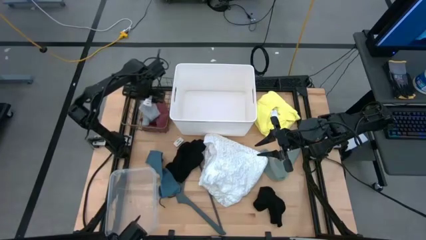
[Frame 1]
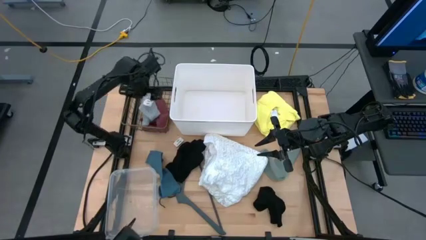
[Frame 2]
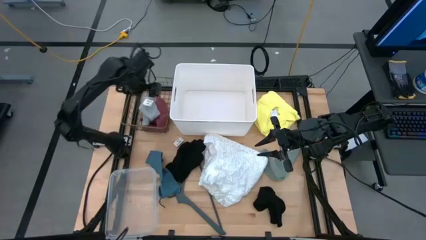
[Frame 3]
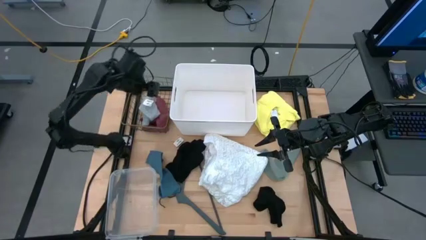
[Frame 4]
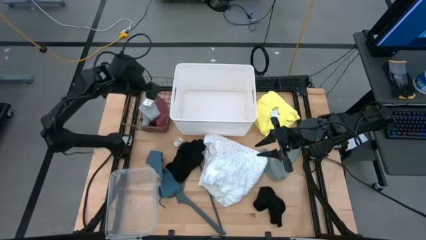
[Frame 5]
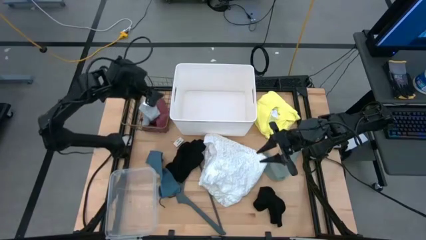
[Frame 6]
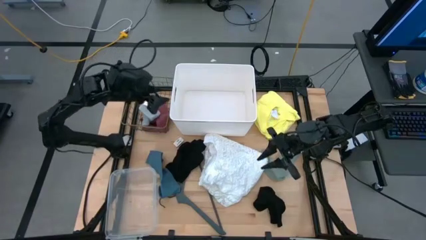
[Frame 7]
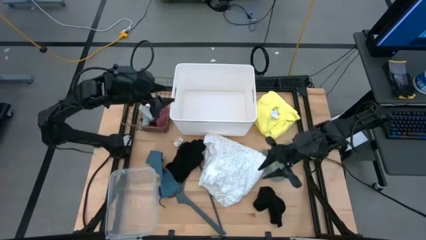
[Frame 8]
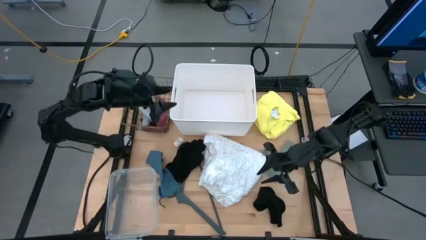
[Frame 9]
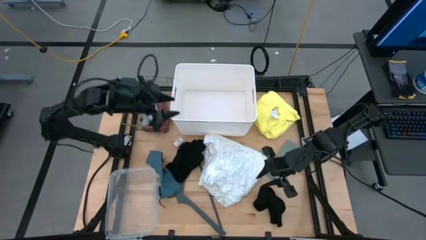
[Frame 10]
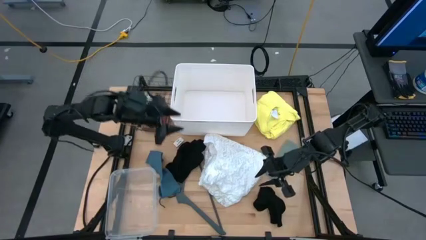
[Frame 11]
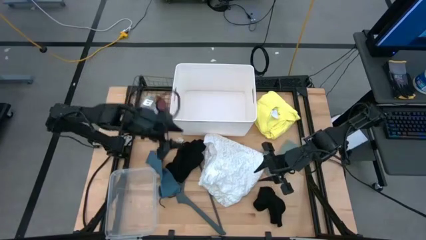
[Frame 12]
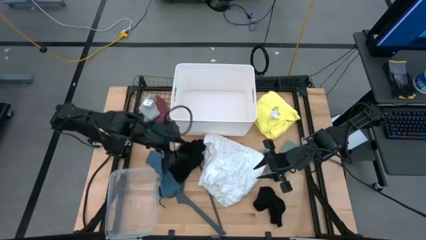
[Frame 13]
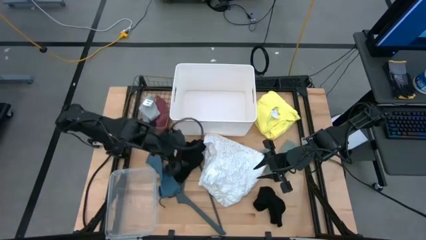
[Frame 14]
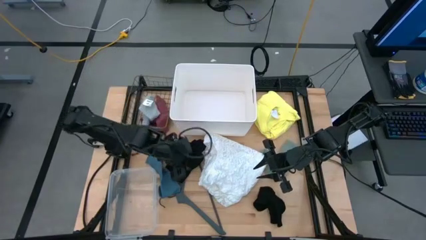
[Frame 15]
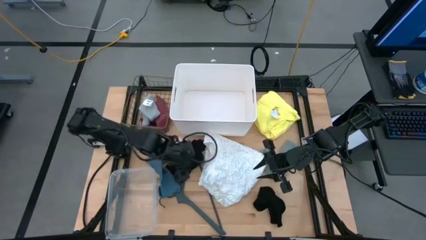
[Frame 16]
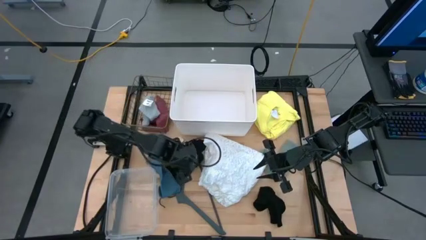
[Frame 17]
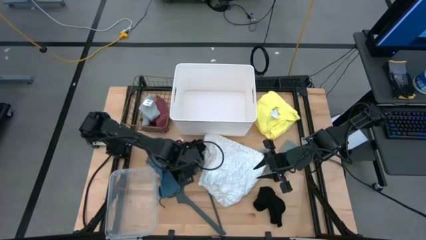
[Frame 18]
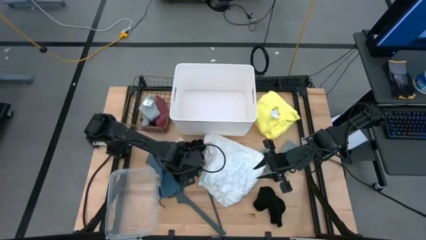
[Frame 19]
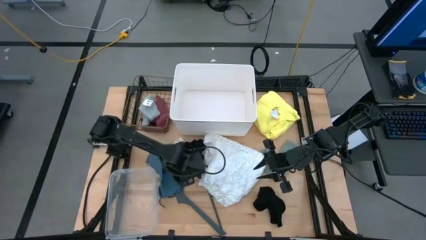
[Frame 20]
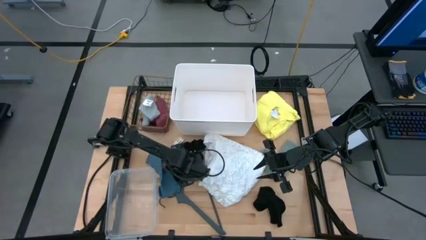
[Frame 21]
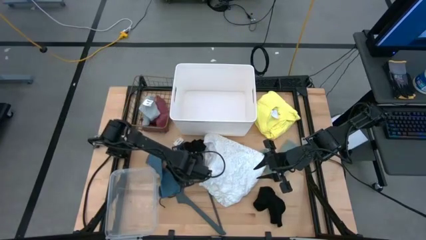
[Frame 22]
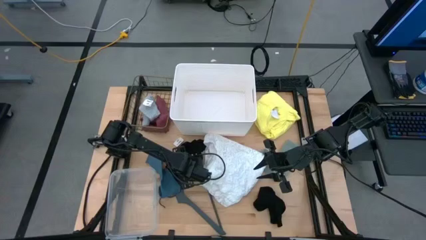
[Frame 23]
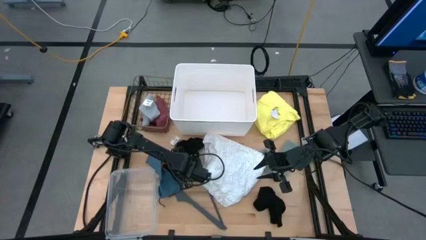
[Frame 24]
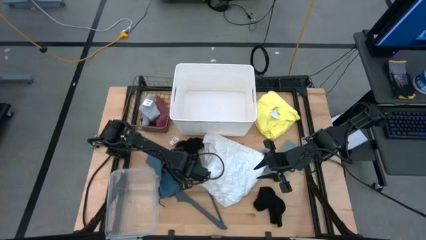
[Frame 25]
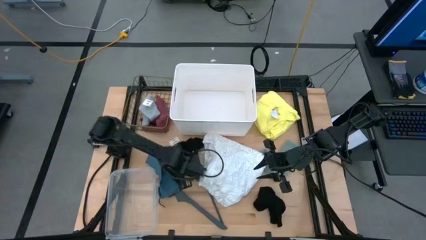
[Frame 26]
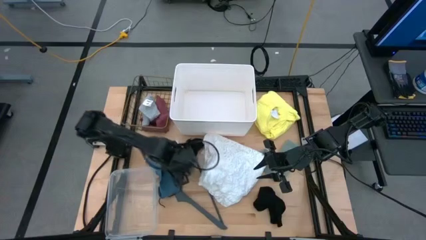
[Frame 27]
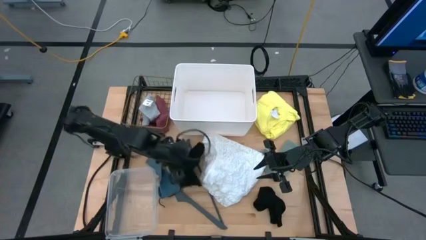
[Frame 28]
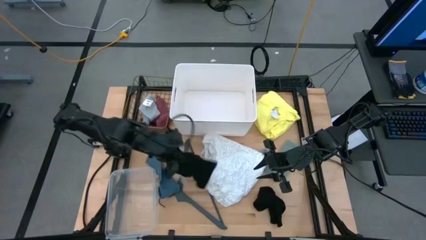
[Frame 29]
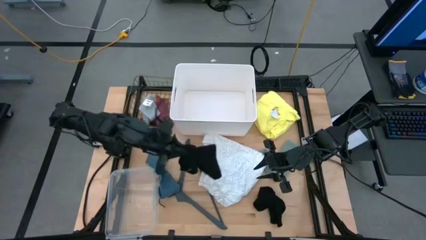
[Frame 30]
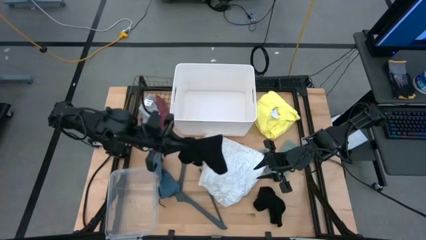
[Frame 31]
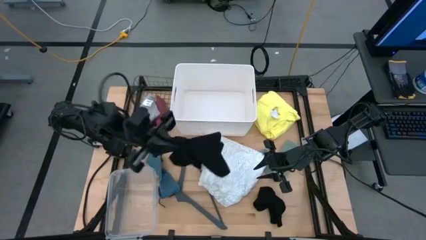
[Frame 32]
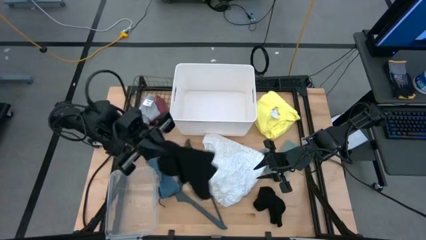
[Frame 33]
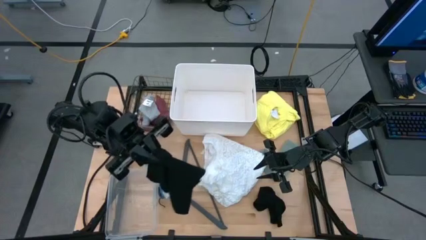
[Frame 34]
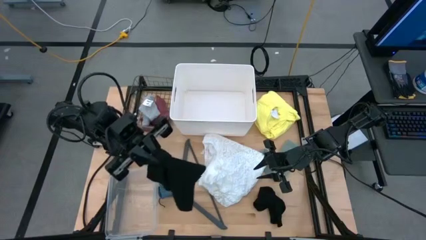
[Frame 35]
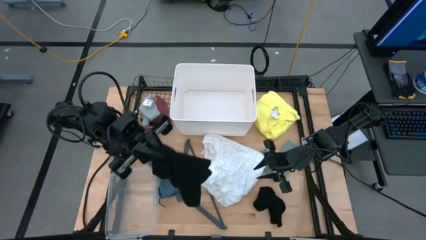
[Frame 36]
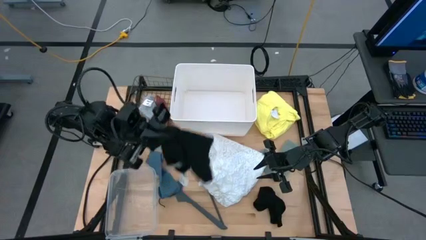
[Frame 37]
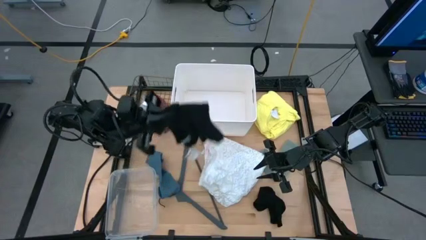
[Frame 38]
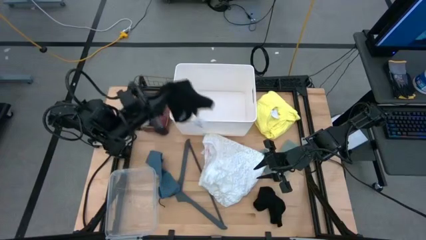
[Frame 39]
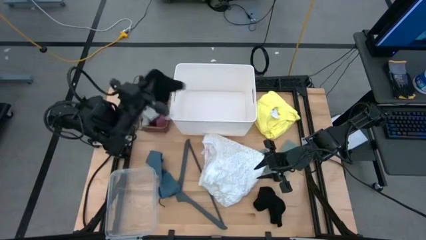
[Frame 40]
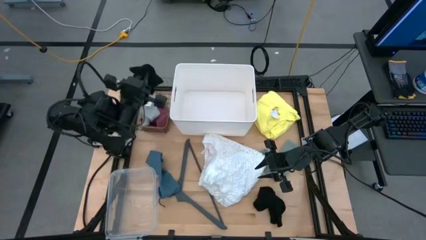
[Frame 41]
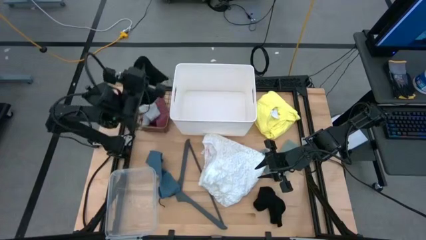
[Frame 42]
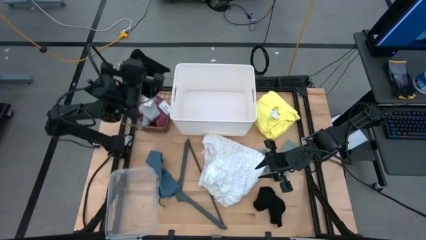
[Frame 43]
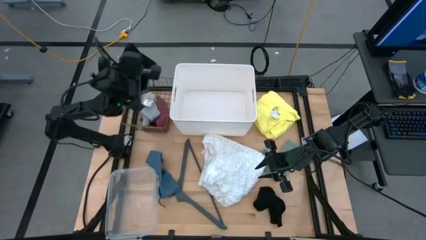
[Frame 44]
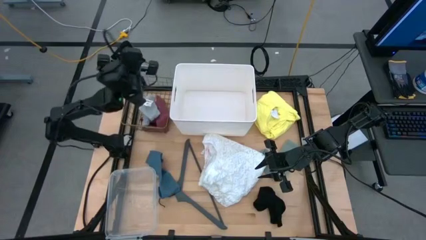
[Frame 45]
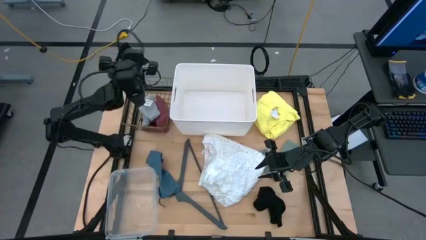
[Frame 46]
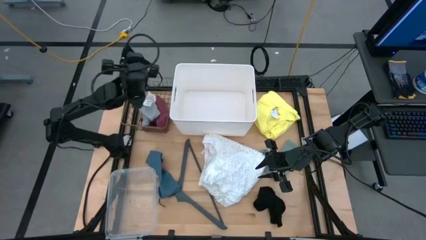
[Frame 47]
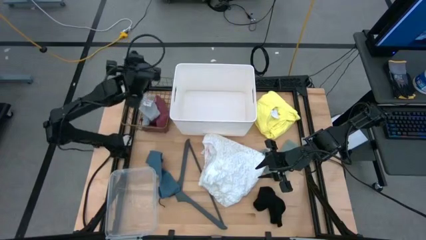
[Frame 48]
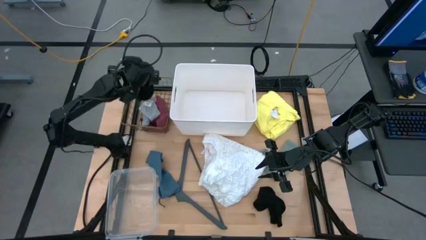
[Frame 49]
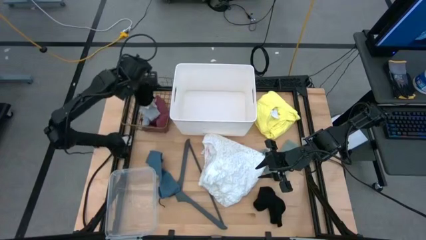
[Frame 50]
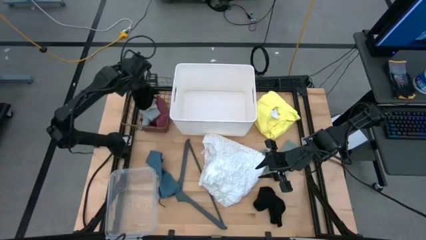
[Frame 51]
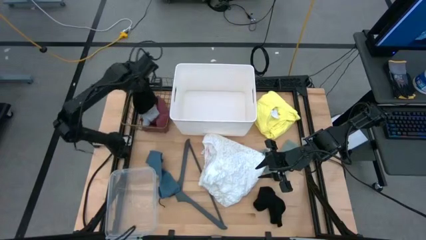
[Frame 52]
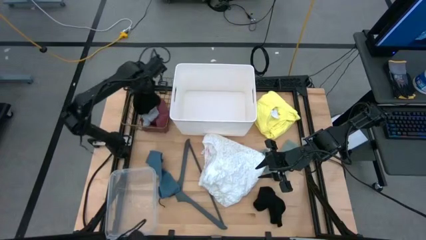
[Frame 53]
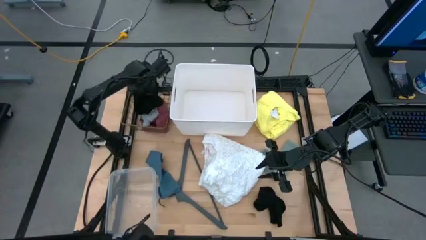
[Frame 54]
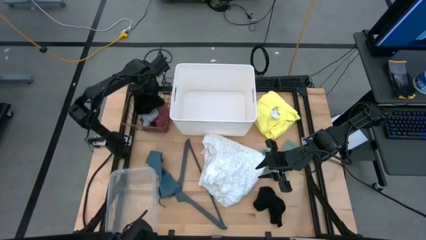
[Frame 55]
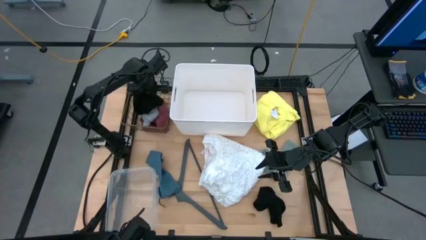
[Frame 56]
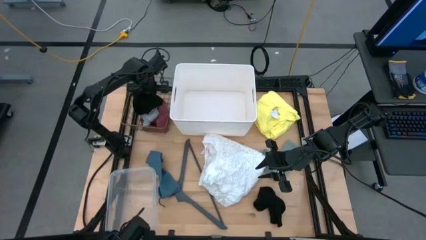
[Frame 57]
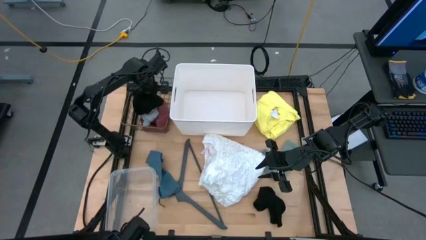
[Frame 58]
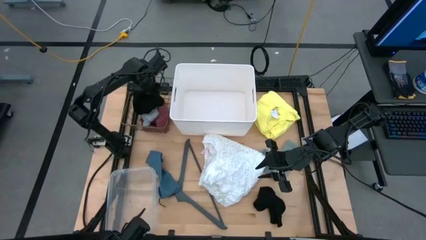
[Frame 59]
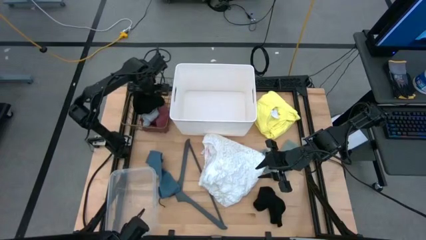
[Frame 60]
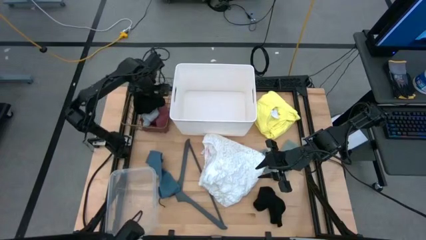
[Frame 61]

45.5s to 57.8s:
Task: Pick & Place Cloths
Put the black underwear into the brown basket

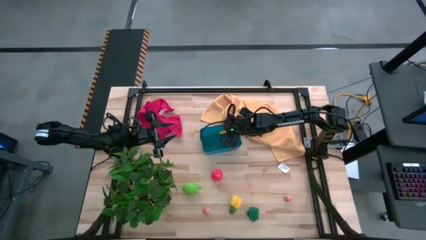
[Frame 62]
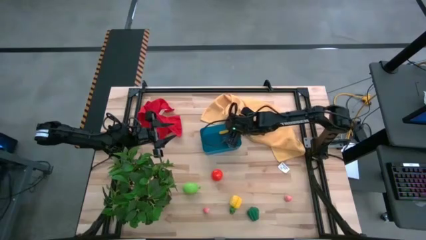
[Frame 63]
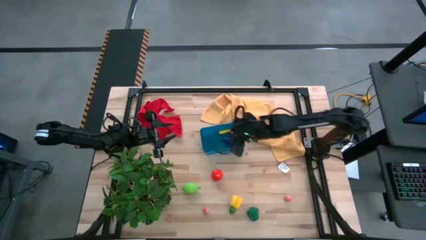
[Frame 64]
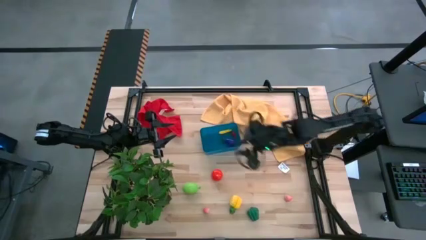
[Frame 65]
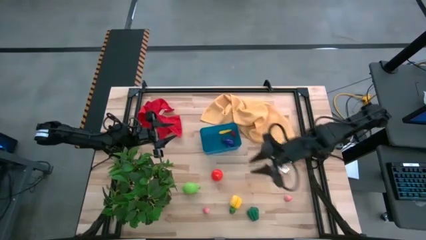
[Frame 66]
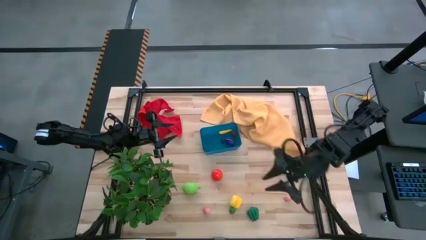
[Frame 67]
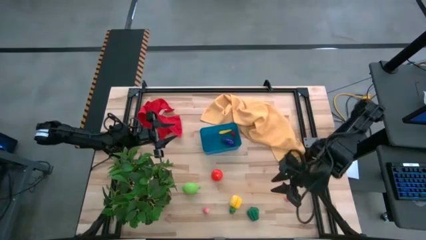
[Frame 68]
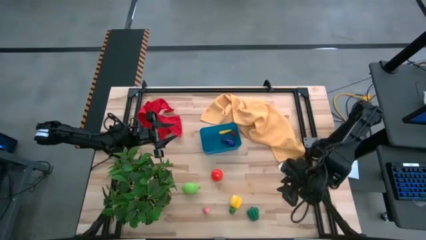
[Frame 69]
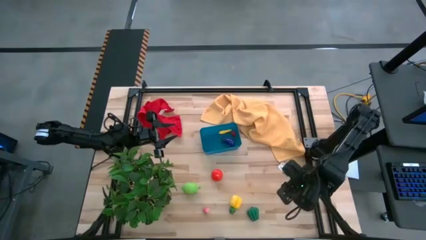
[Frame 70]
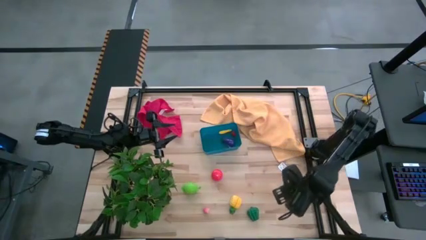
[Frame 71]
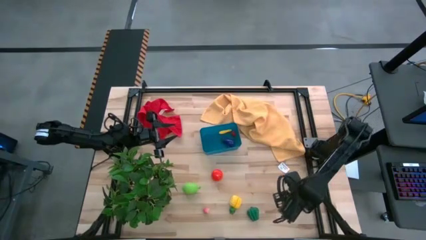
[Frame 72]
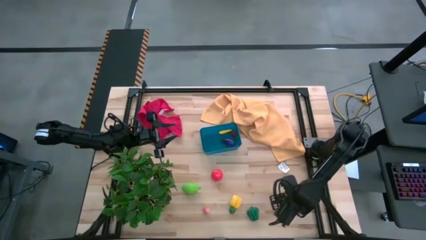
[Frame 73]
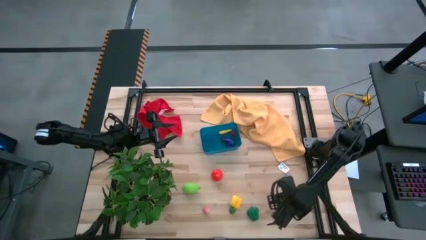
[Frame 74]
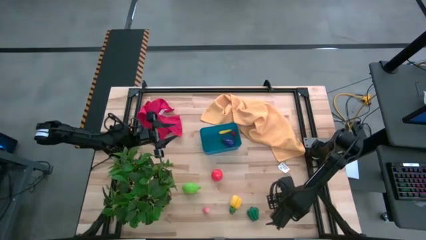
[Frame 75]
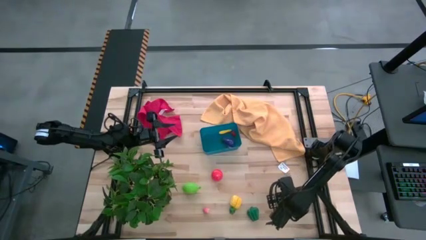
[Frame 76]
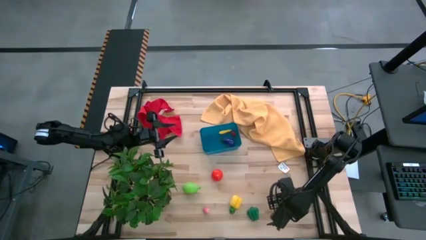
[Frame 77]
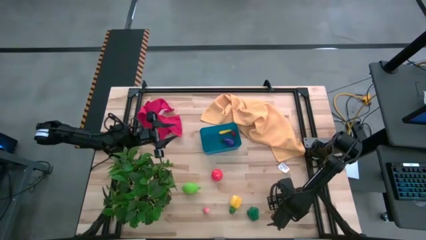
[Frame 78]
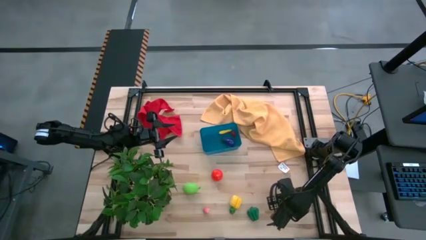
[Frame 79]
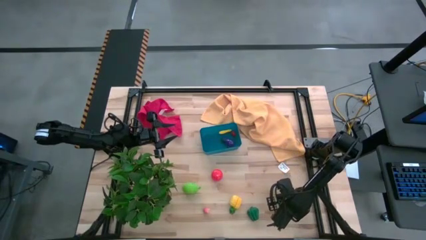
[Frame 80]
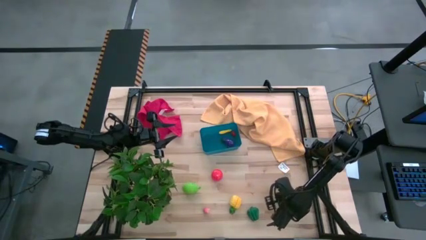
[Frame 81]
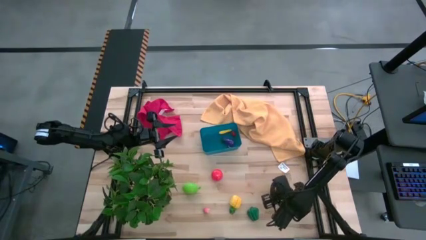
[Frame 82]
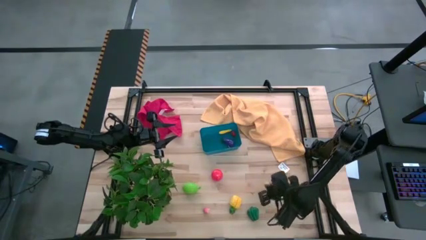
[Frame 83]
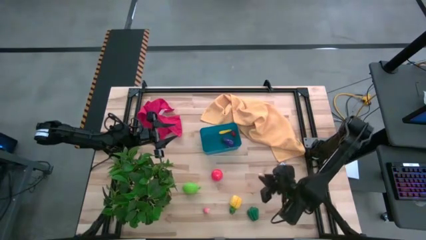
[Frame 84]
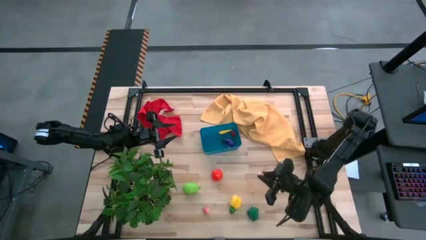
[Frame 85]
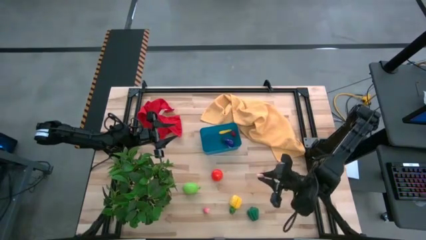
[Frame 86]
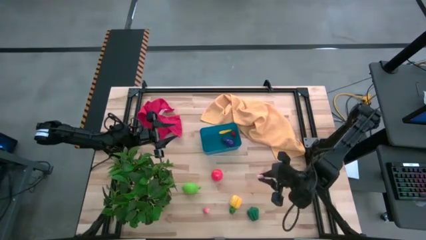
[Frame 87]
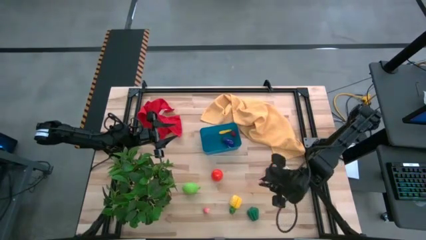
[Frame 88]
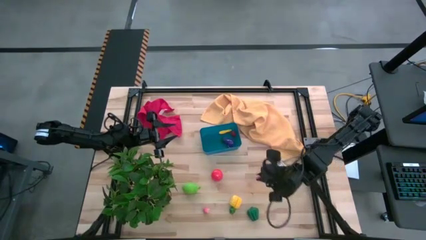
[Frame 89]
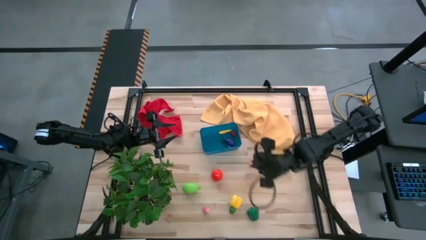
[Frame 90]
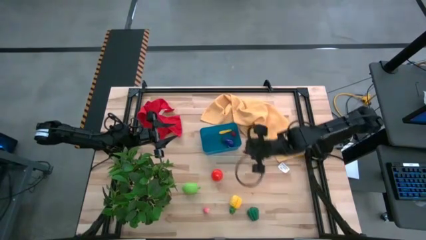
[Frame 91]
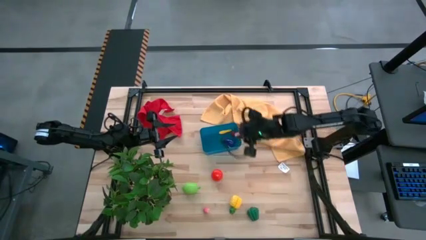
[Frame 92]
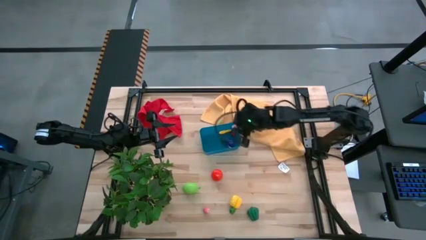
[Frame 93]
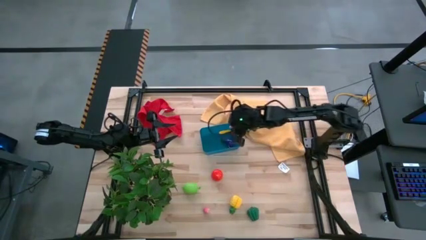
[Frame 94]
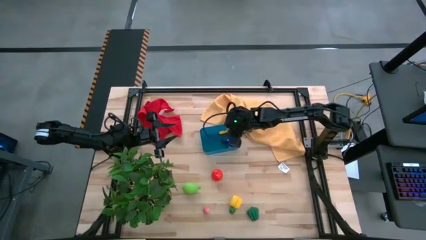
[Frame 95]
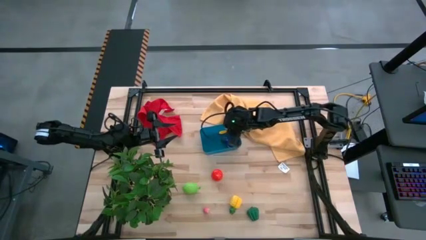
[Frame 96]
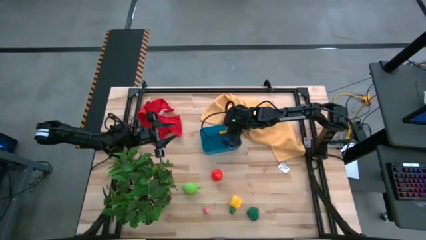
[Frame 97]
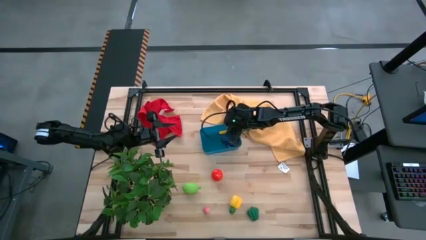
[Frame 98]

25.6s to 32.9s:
Task: Pick and placing Produce into tupperware
Put the right pink peach into the blue bin
